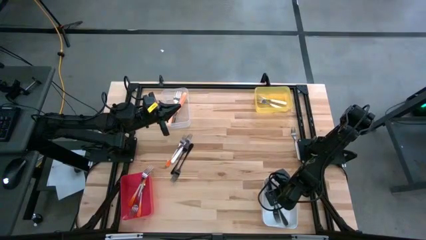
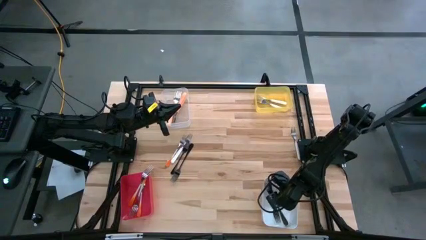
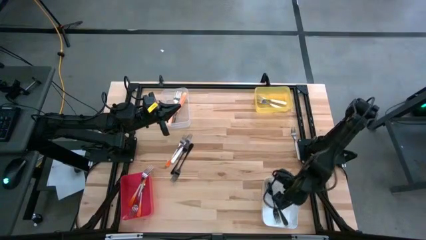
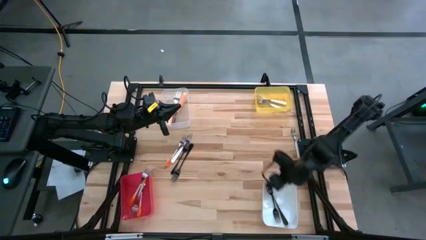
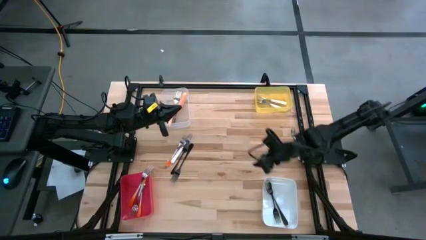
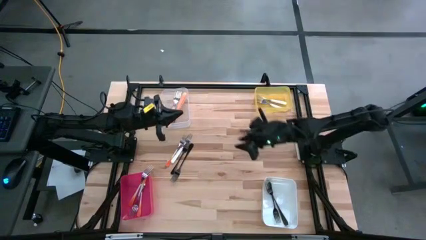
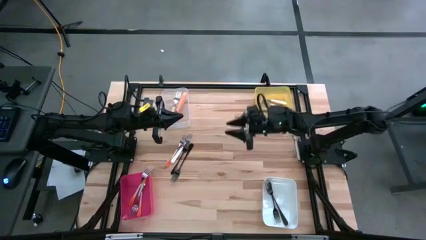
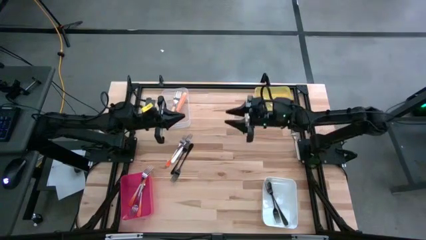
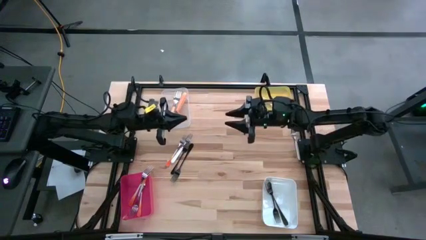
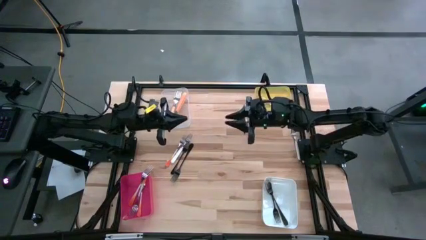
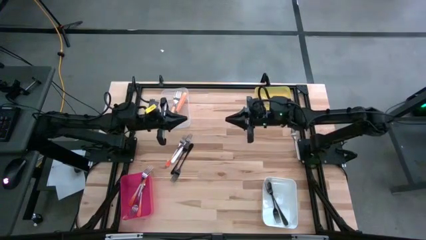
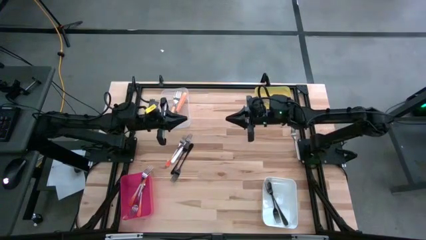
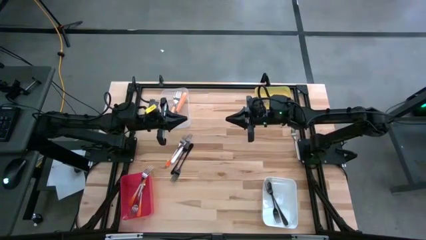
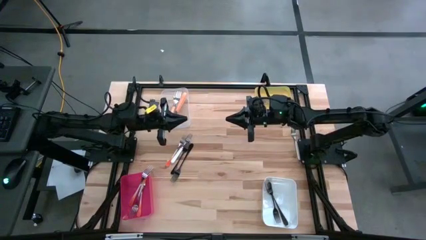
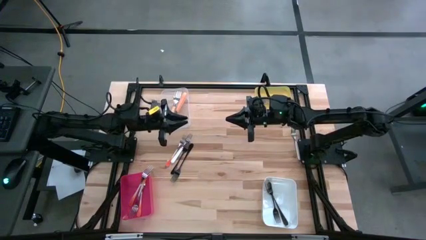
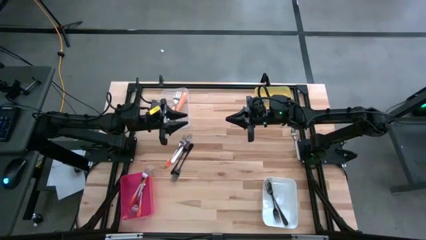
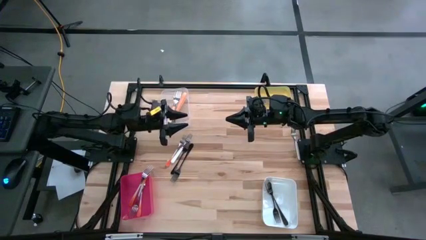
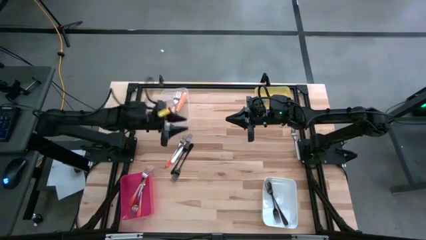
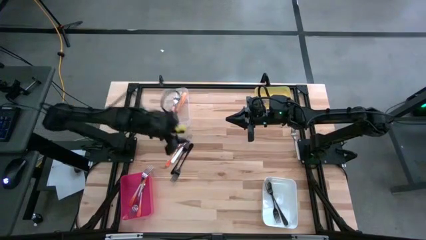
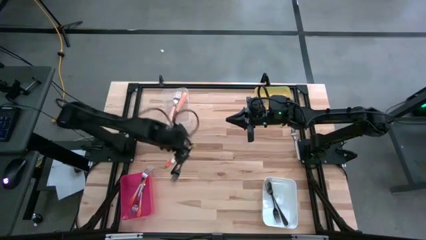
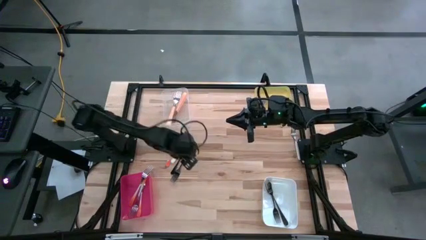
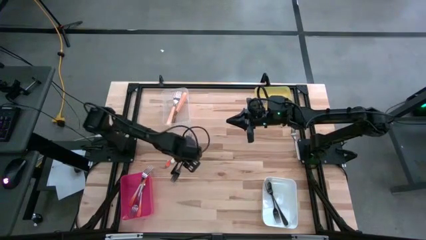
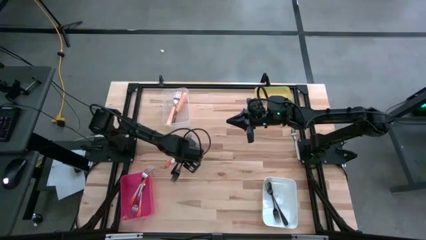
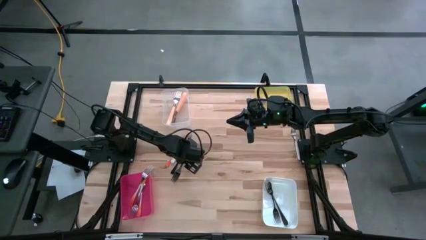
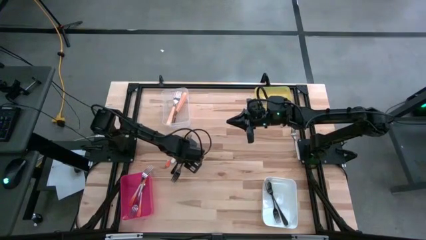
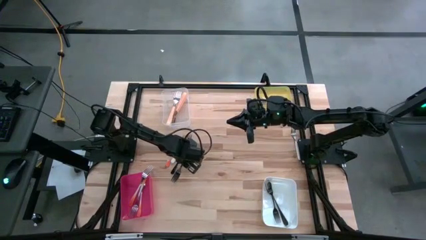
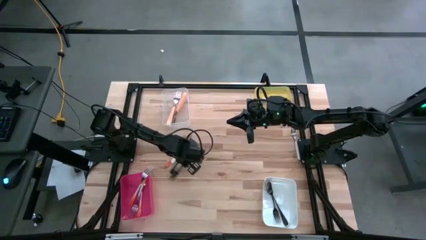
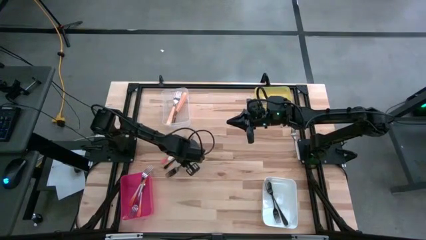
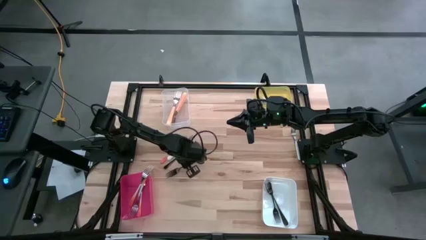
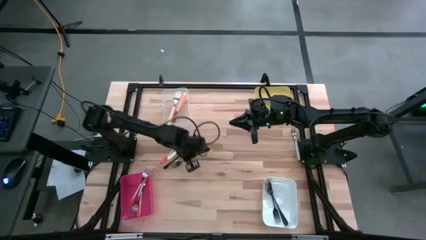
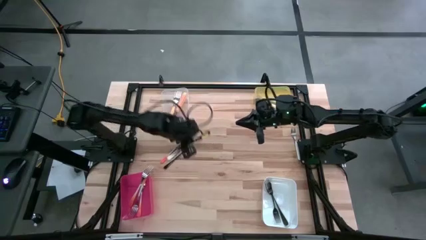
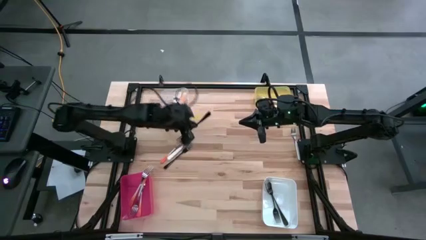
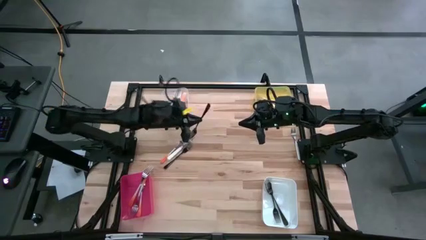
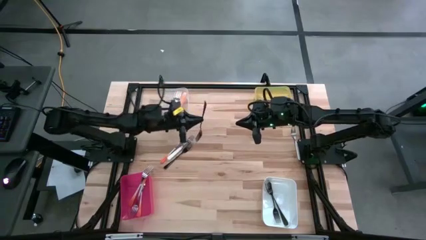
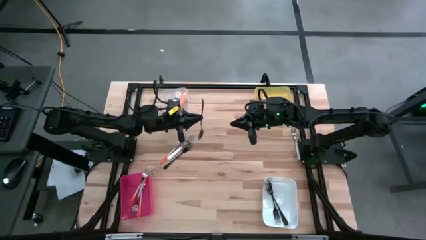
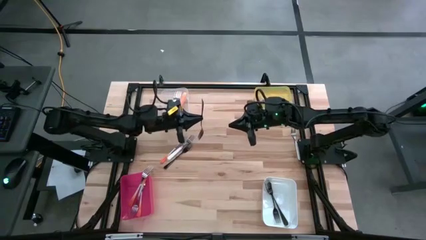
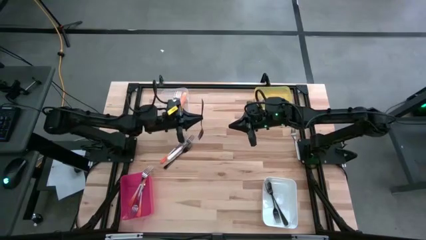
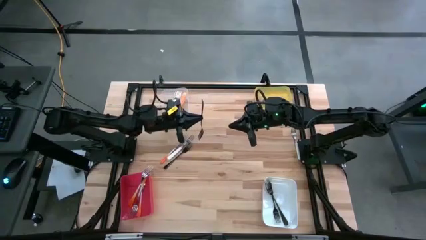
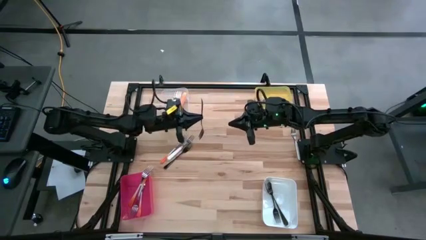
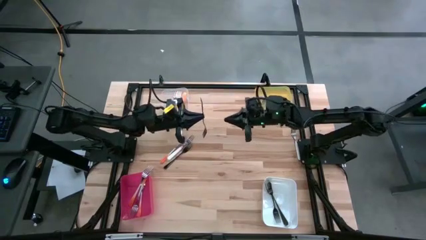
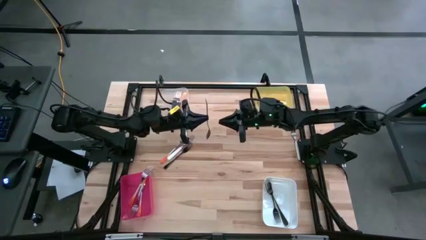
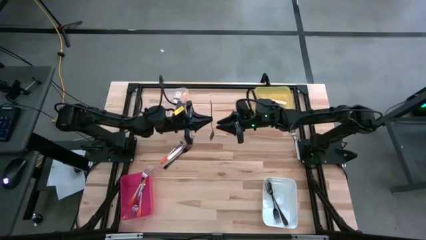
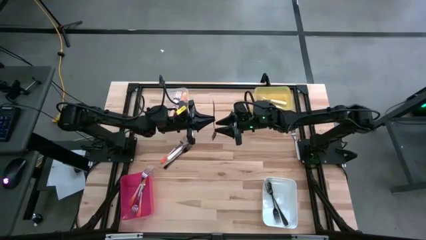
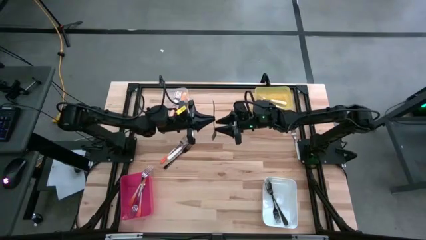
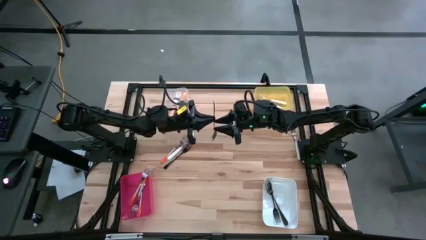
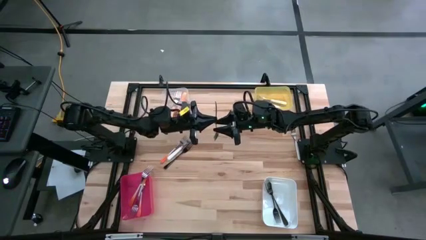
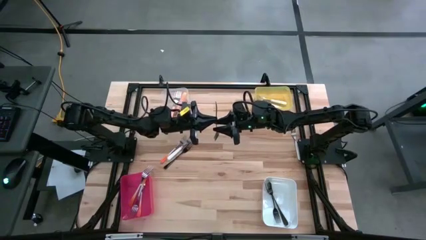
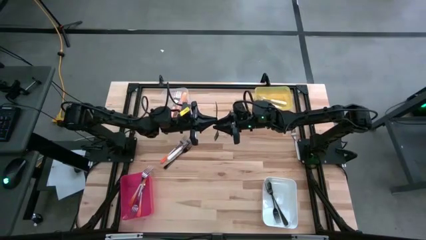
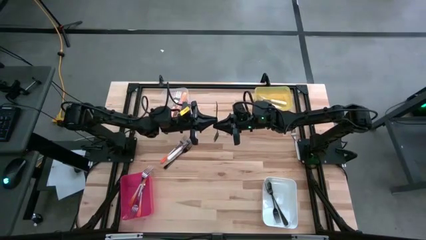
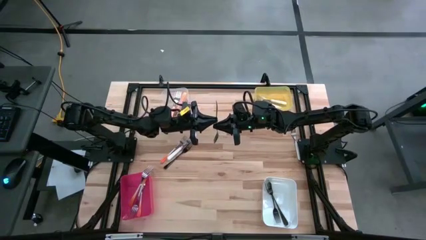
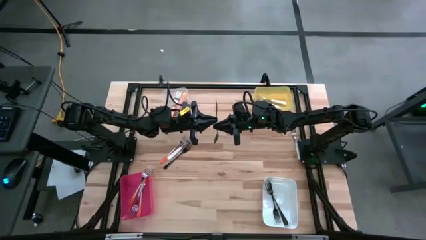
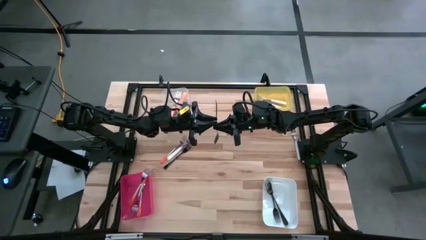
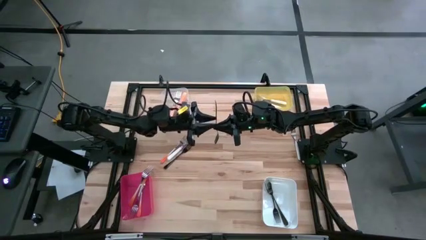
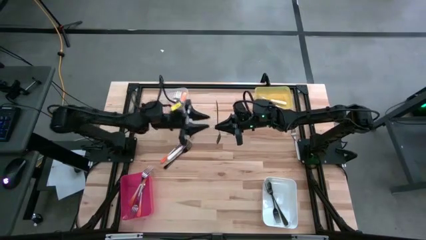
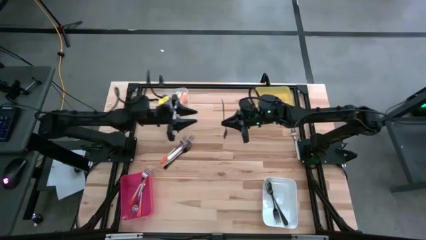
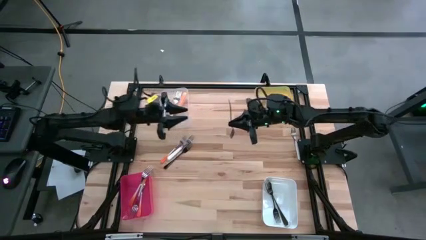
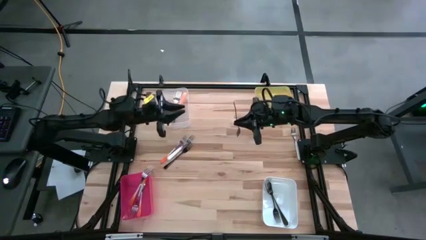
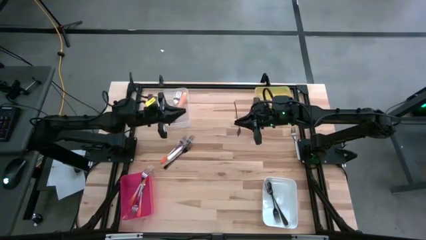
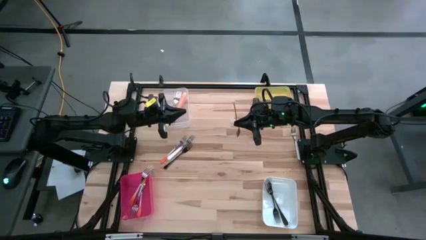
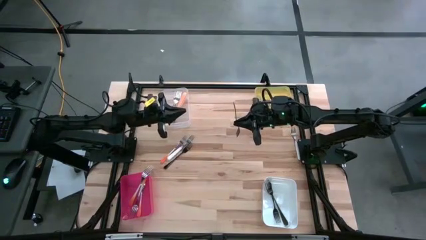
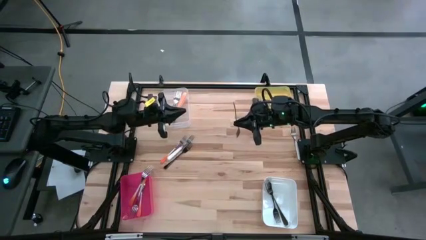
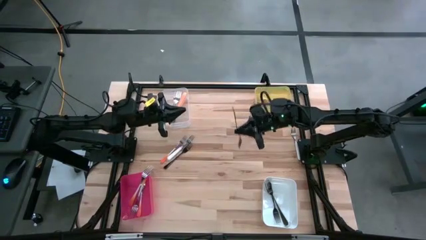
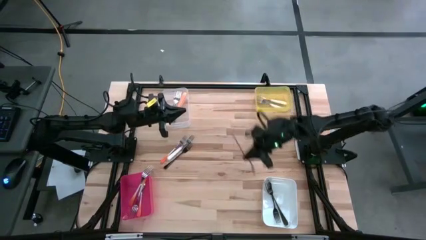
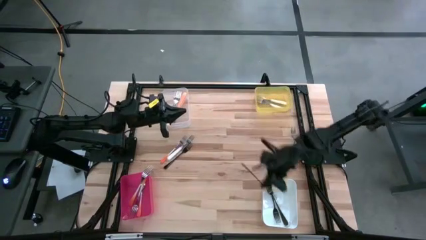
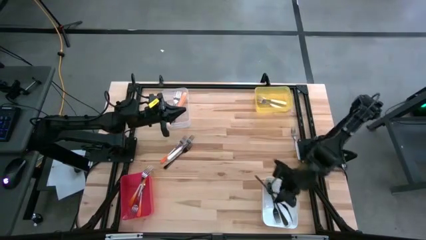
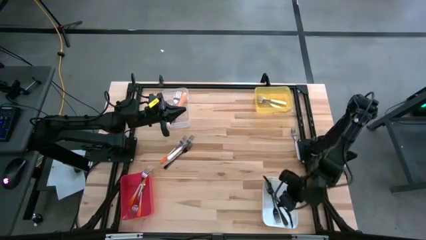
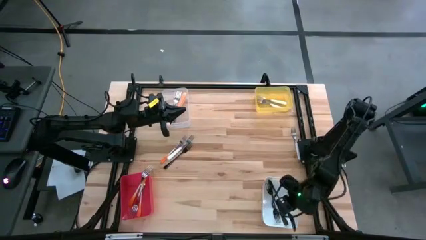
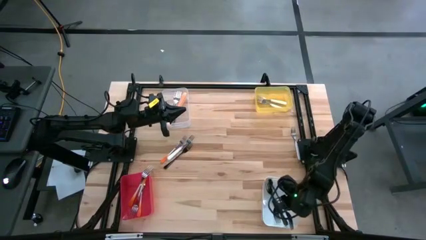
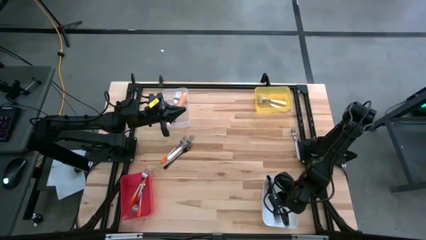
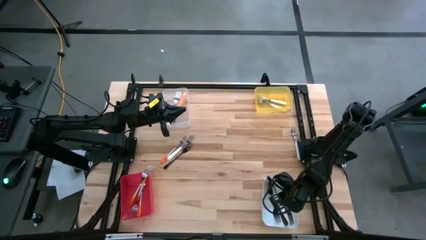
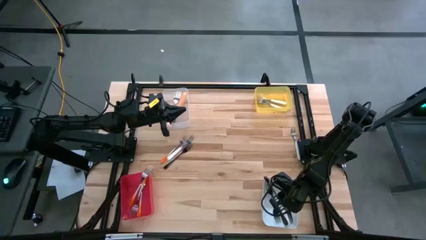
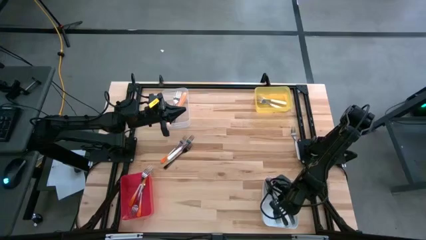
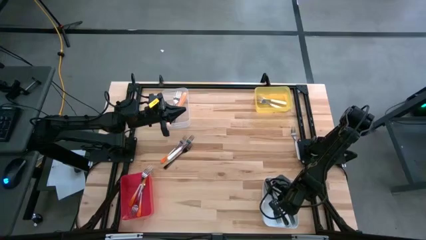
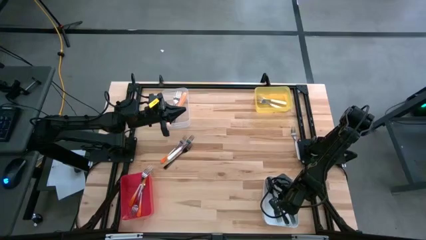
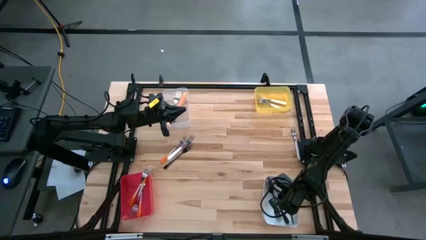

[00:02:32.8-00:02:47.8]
Task: Sort silverware by color (type)
Put the black fork into the white bin
